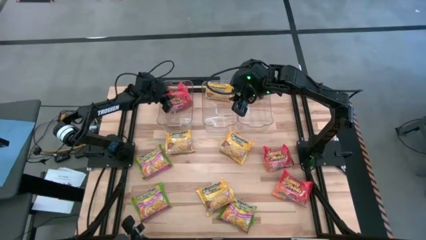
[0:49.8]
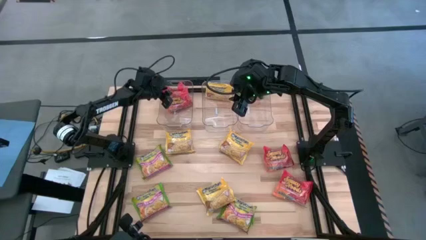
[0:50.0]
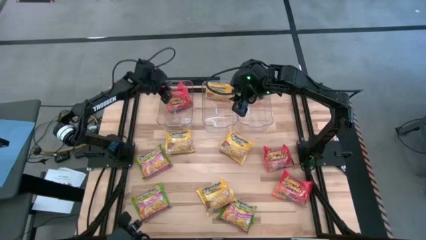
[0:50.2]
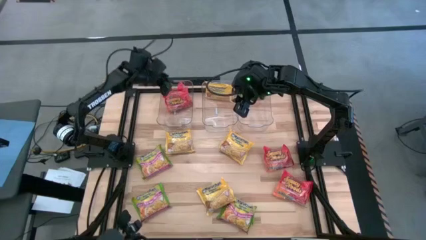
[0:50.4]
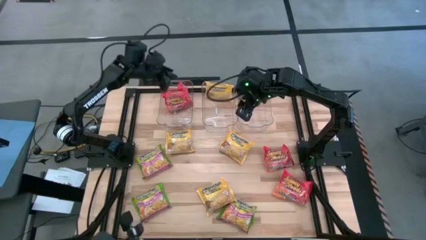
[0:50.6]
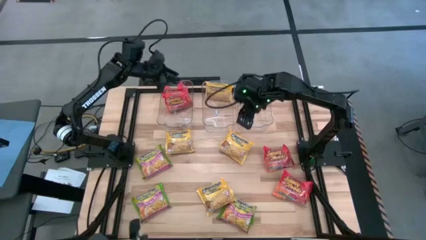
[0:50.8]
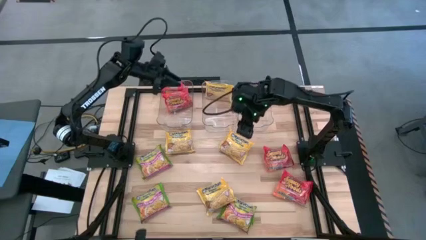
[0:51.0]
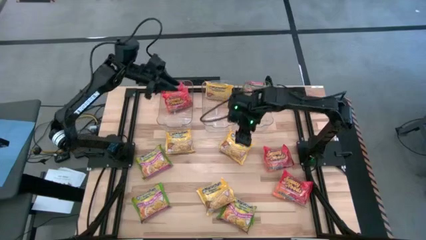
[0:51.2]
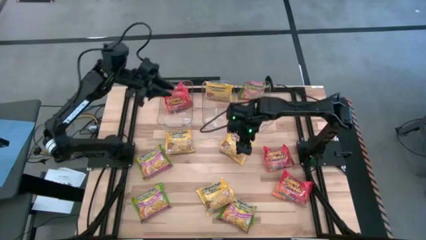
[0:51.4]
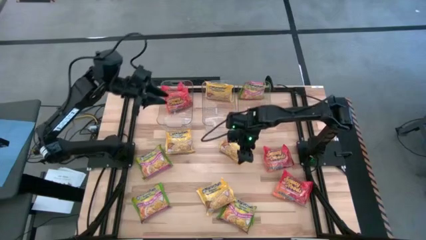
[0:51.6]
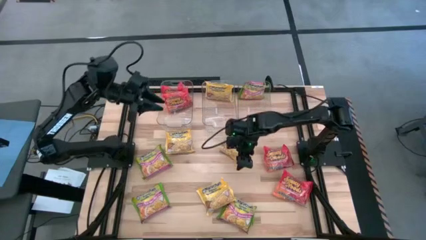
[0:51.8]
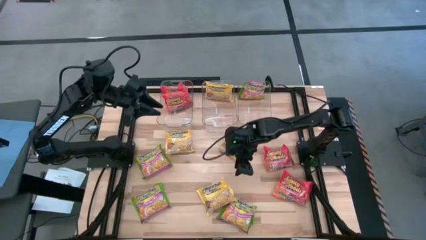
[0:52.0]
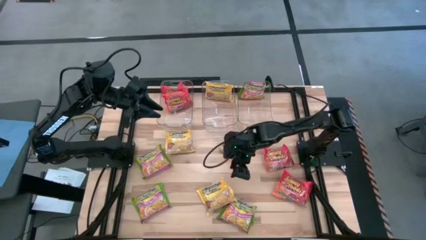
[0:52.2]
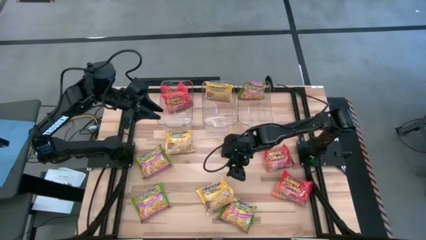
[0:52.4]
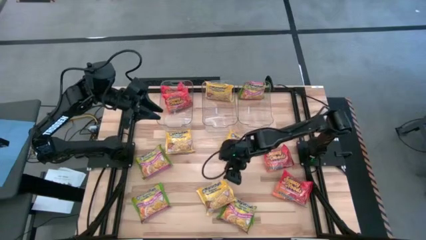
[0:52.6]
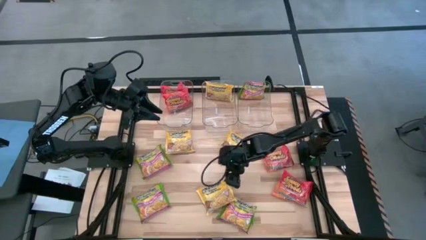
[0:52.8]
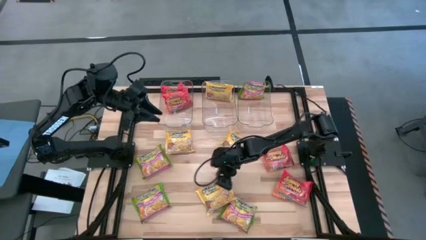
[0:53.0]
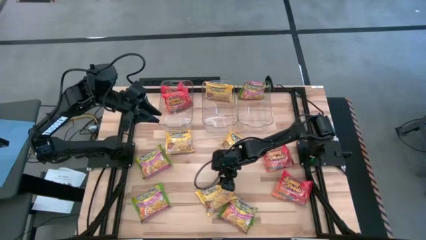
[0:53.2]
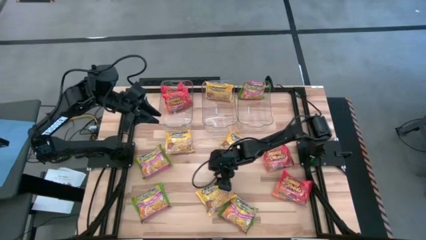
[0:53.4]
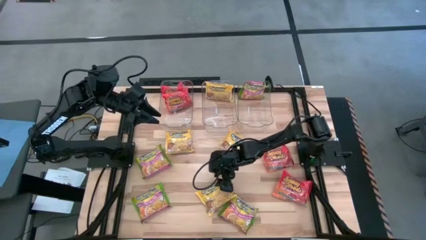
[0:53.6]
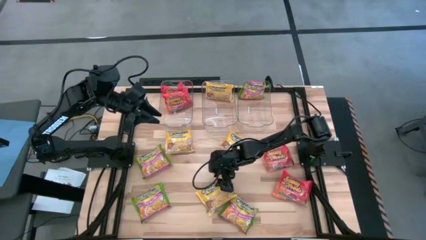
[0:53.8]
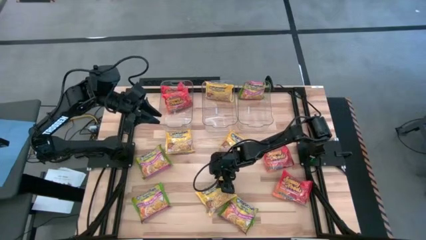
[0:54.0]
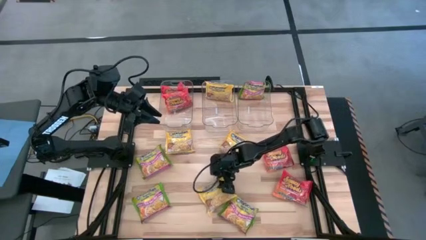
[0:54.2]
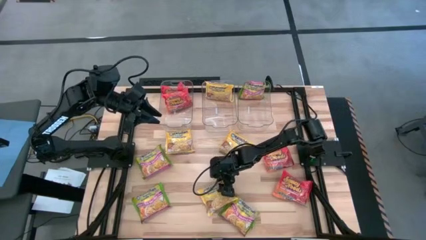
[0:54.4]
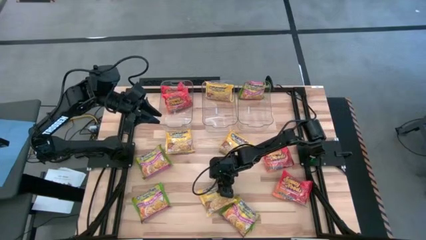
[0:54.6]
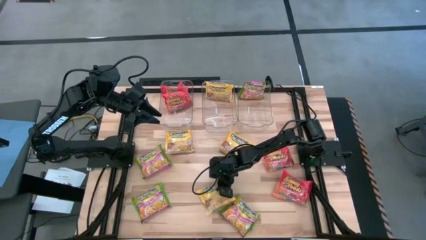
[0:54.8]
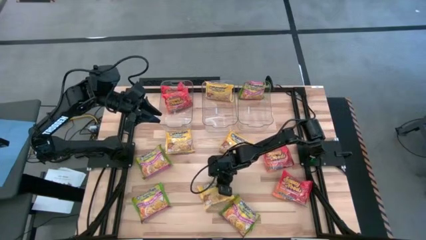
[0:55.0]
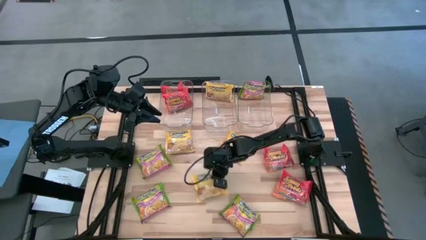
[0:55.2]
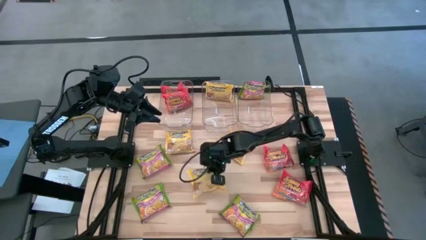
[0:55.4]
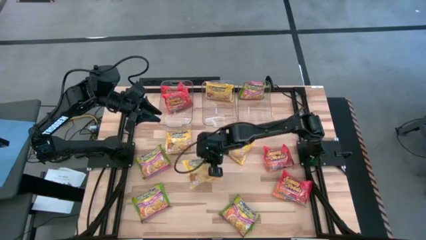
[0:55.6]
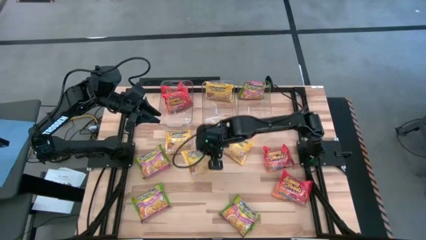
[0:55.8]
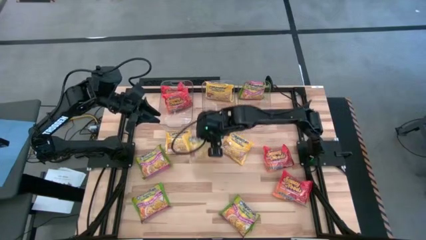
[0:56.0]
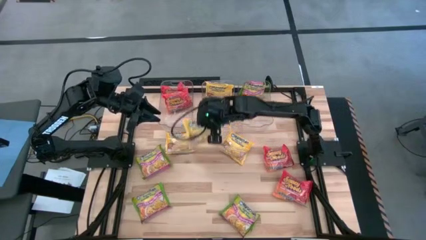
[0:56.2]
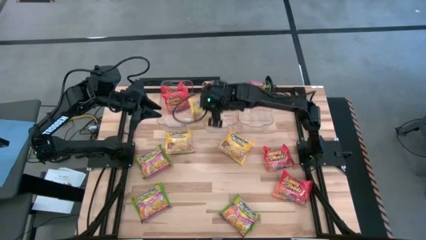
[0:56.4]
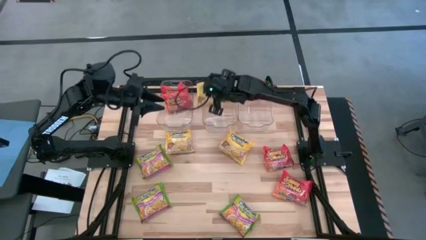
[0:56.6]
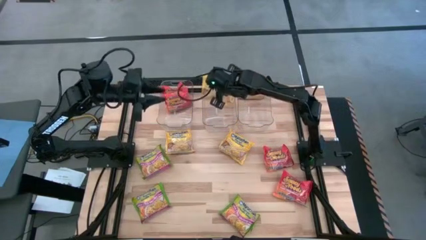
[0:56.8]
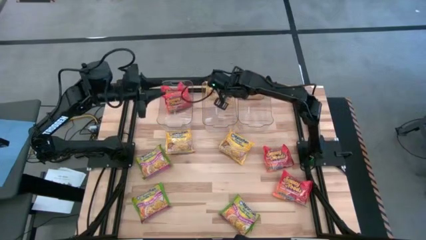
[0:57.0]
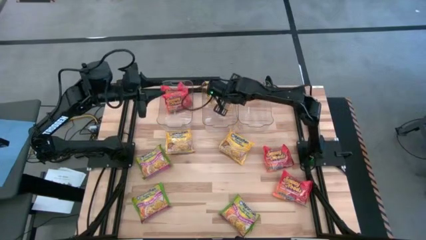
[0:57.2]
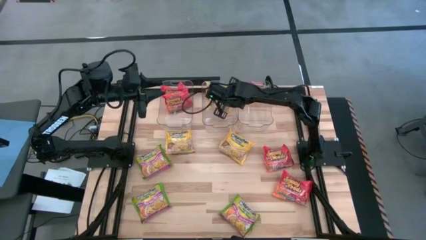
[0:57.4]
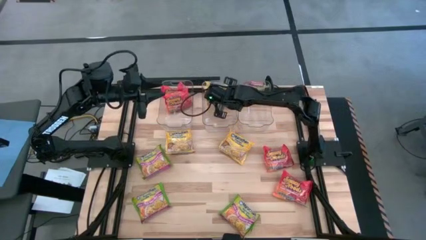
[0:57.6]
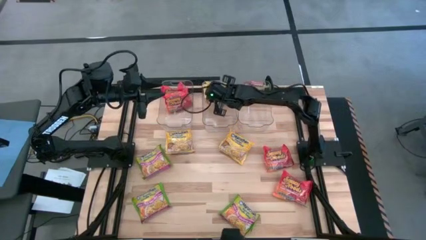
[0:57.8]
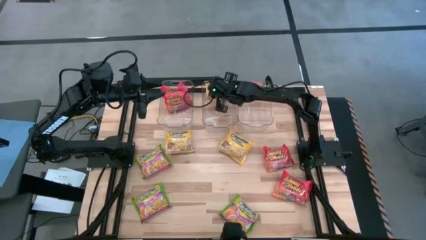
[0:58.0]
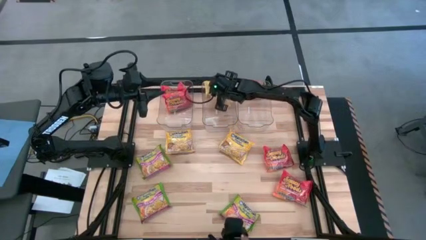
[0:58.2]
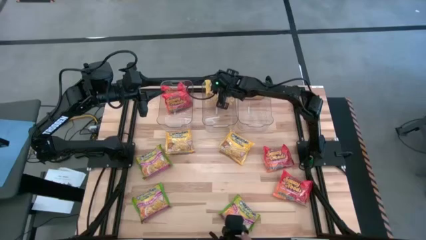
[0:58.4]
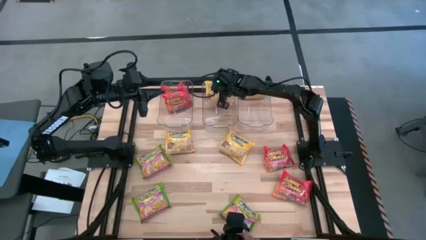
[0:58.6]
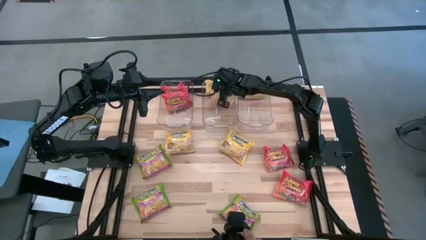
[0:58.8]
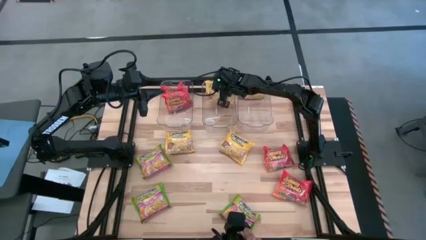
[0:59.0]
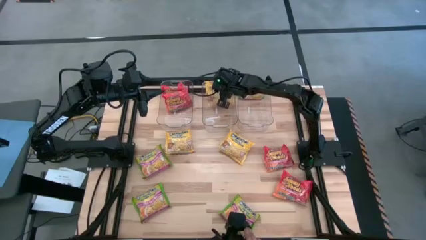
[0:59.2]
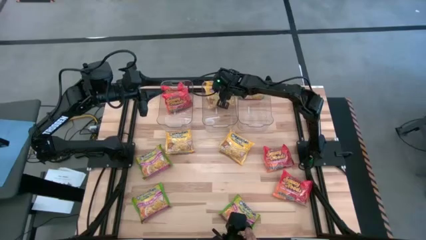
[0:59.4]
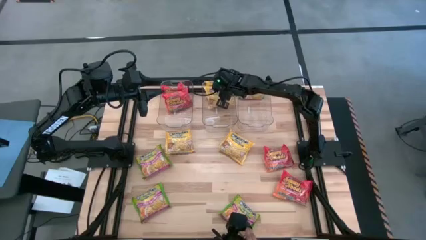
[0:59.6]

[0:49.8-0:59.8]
Task: Sort Maruchan noodles
Put the yellow noodle pack into the middle transparent bin

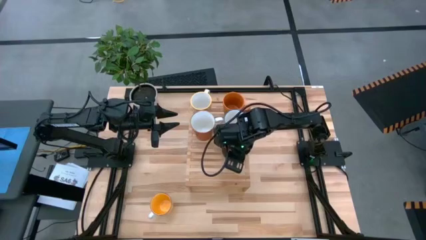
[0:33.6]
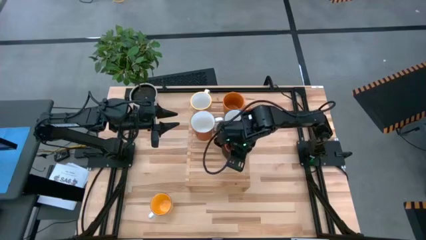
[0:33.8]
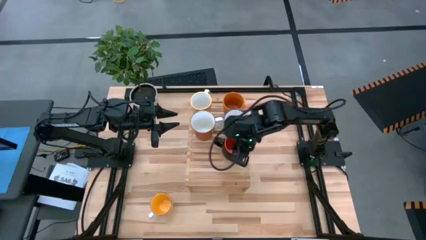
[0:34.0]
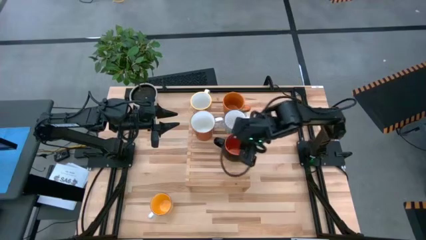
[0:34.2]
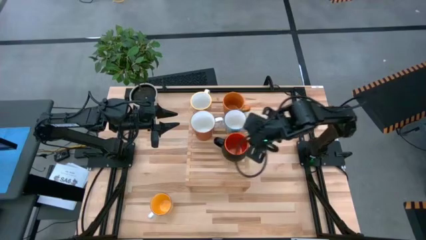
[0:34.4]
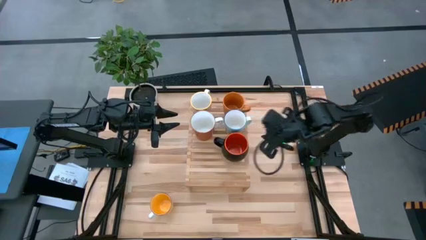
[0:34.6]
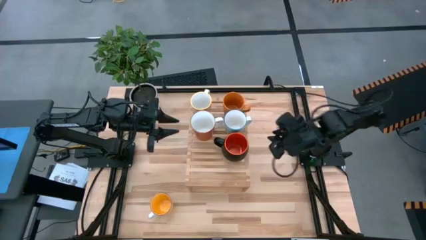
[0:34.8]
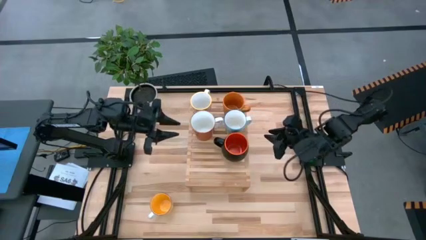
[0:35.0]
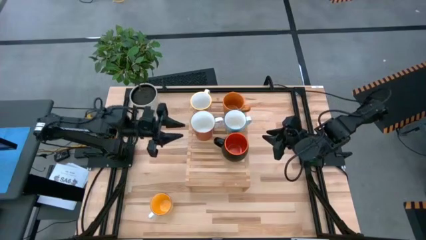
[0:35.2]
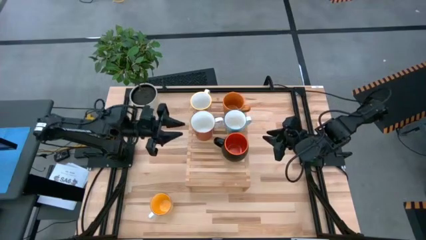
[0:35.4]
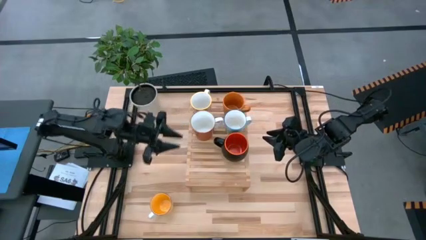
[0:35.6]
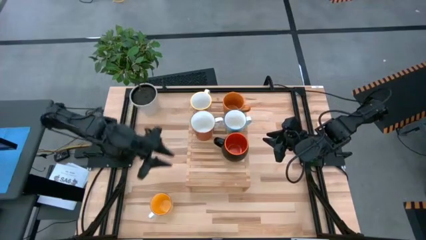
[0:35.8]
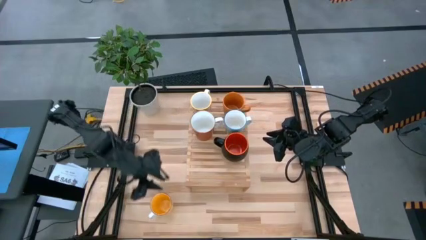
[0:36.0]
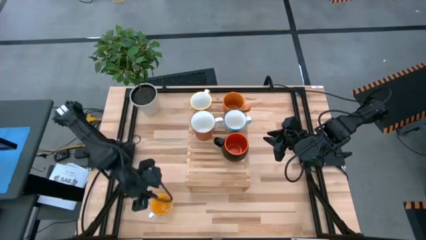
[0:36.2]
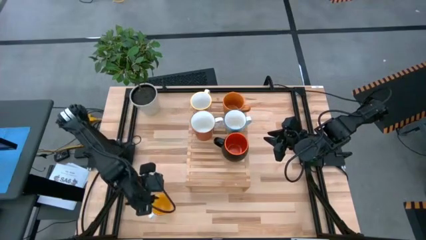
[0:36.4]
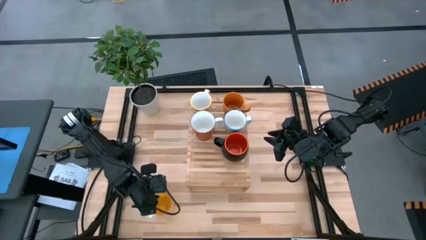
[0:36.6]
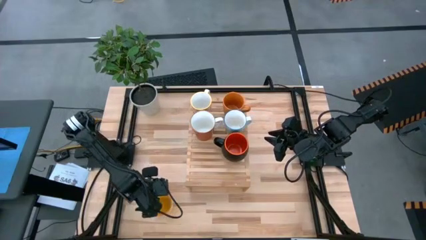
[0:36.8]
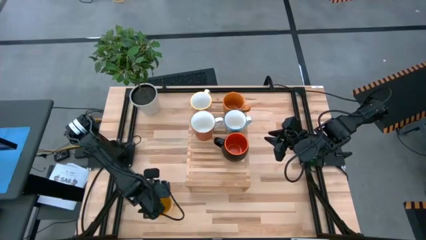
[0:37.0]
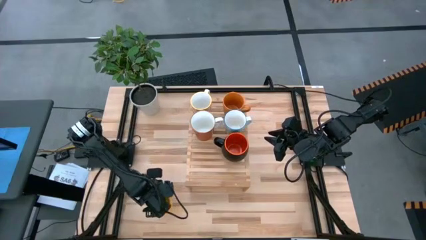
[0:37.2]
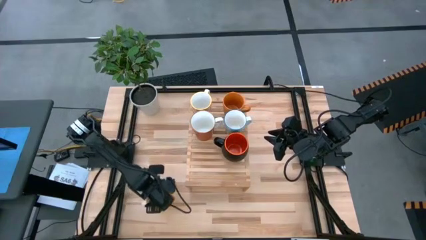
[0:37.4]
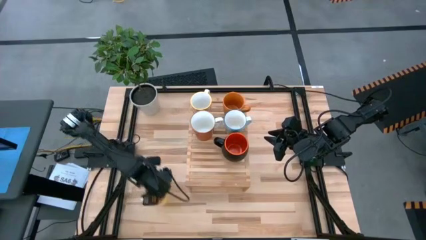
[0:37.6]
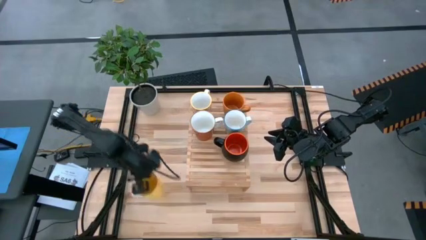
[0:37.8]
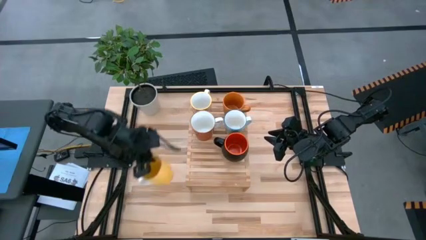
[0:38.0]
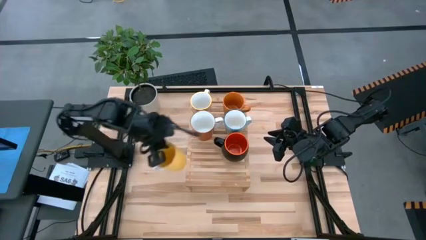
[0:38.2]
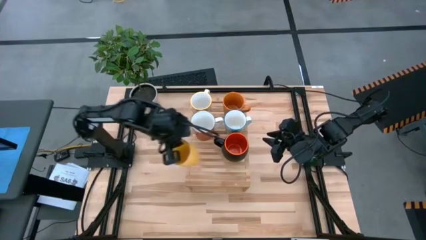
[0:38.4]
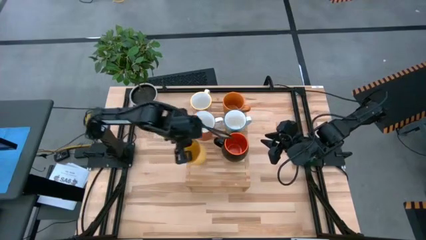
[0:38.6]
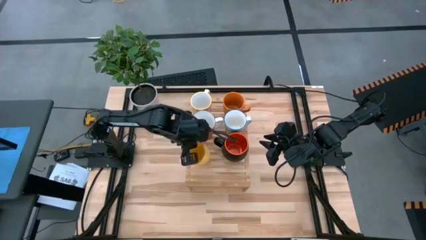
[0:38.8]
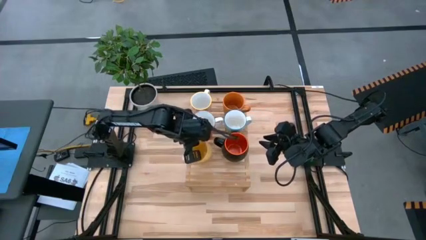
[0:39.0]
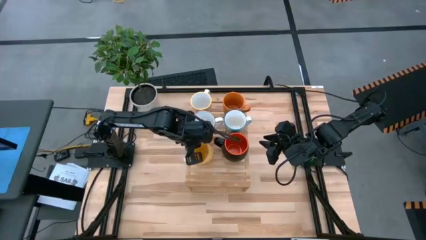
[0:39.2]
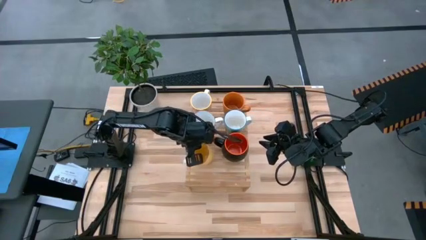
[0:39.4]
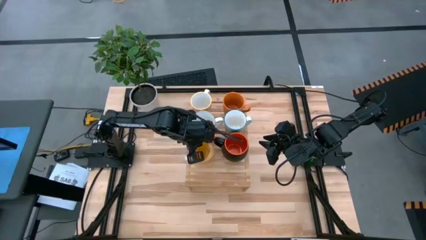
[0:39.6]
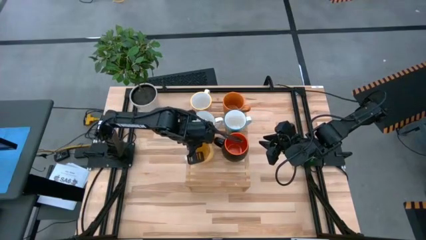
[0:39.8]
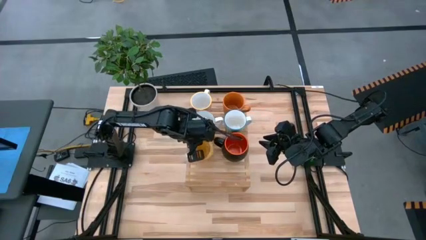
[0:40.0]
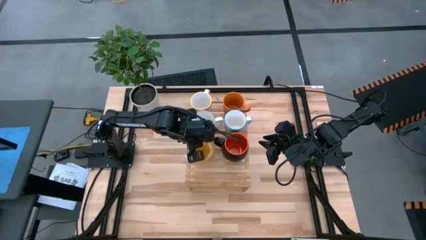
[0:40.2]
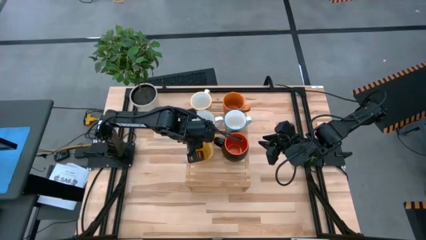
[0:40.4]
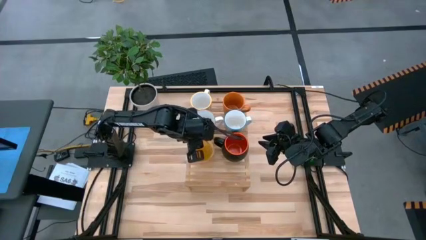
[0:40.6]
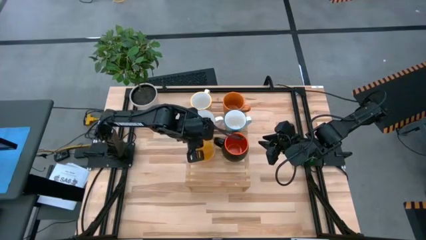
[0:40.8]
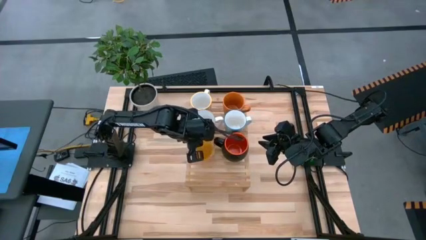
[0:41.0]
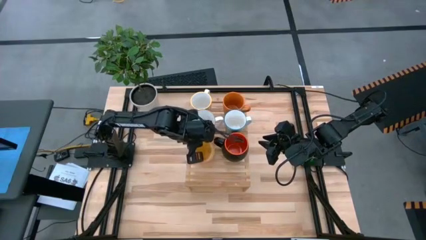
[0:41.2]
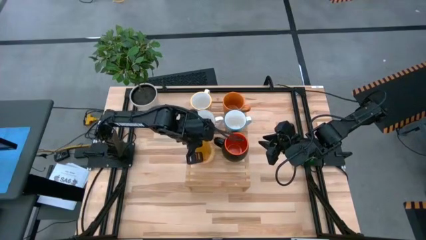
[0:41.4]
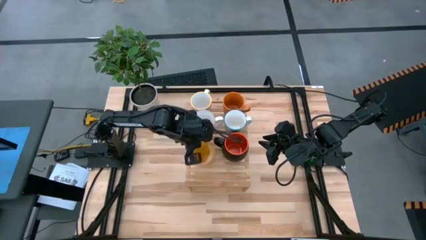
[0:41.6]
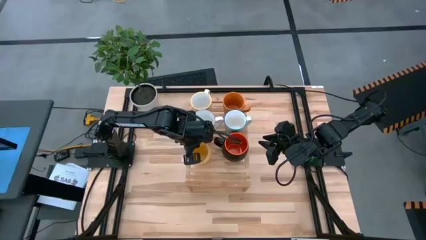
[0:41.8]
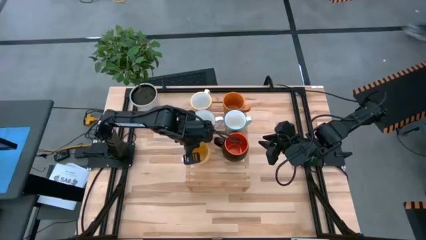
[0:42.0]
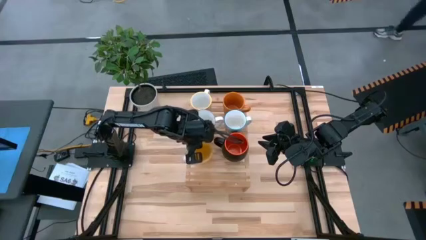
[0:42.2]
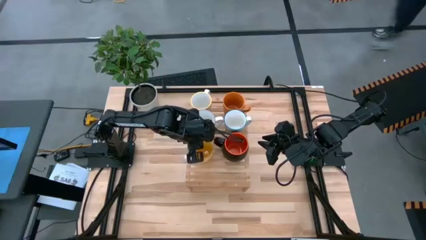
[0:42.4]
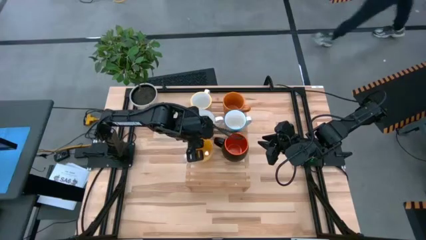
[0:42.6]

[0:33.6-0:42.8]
Task: Place coffee mugs
Put the yellow cup on the shelf aligned with the other red cup
